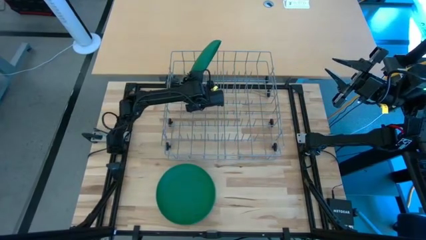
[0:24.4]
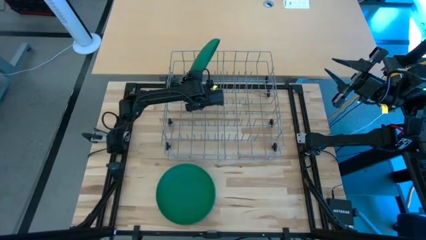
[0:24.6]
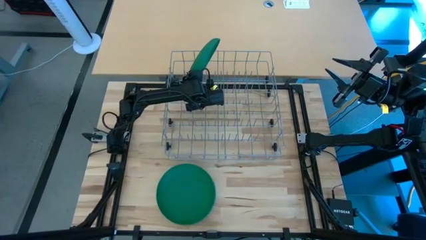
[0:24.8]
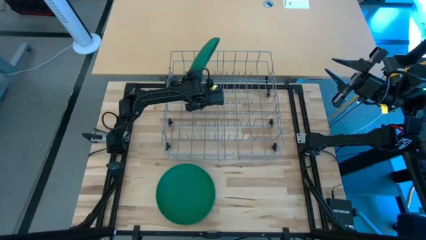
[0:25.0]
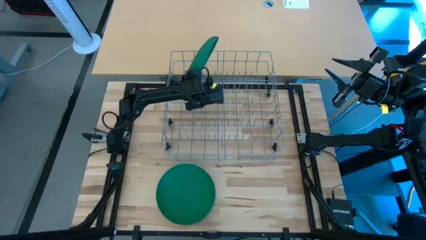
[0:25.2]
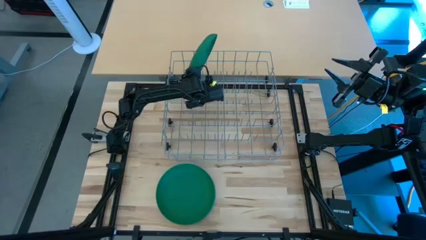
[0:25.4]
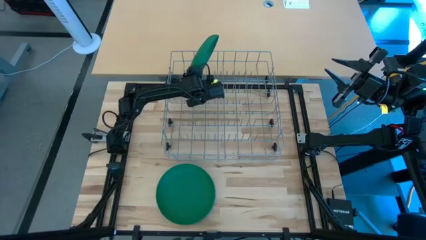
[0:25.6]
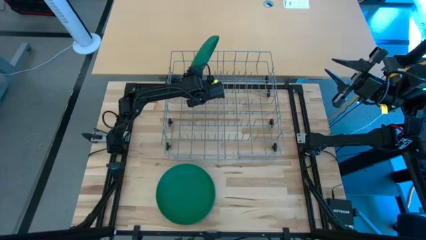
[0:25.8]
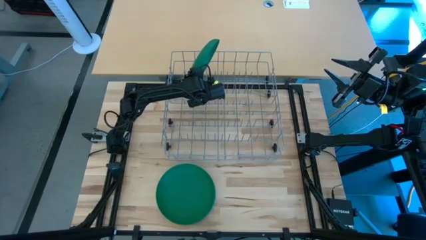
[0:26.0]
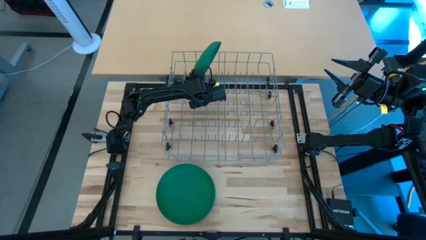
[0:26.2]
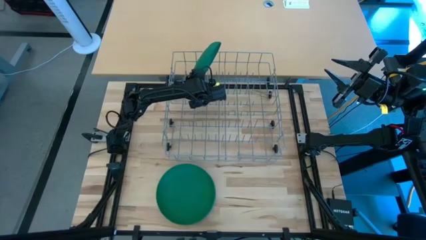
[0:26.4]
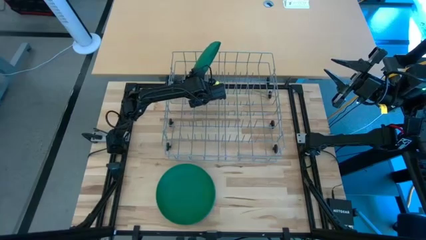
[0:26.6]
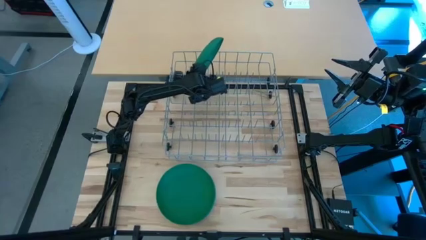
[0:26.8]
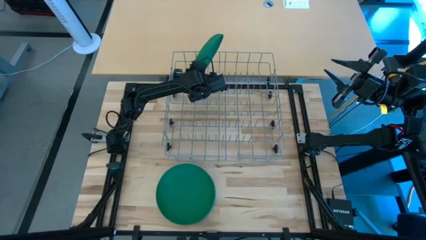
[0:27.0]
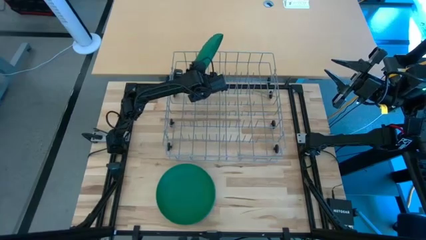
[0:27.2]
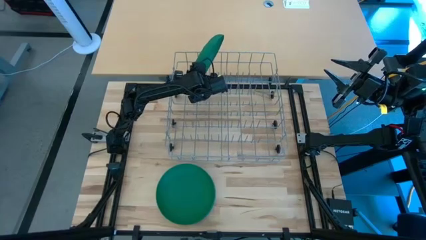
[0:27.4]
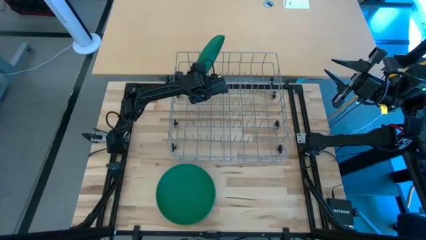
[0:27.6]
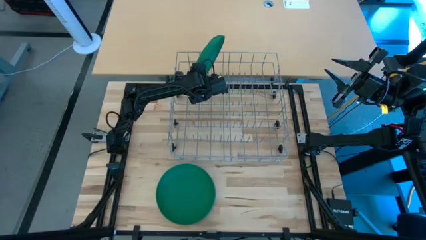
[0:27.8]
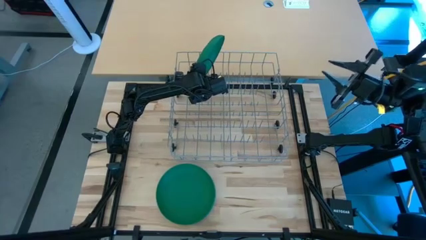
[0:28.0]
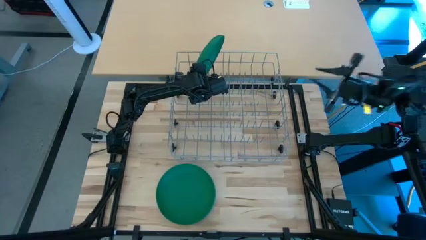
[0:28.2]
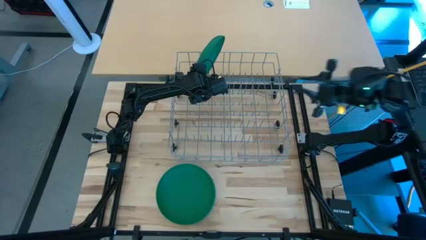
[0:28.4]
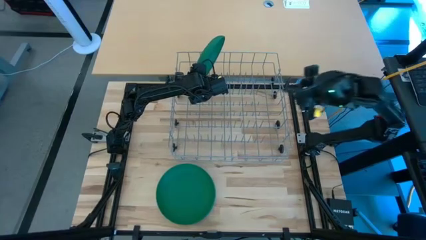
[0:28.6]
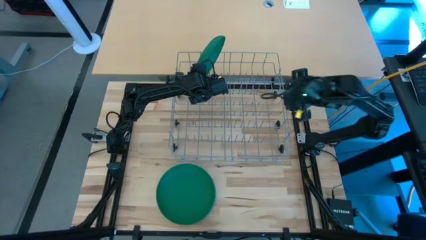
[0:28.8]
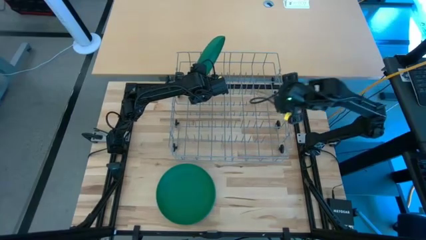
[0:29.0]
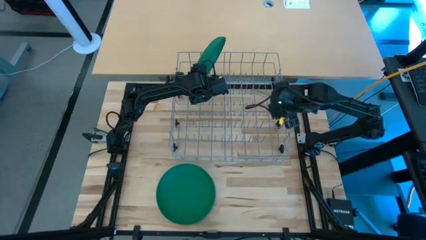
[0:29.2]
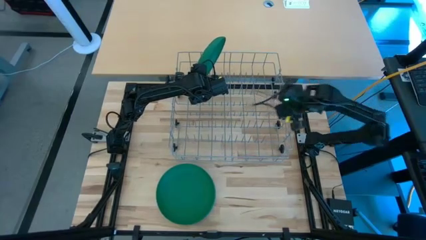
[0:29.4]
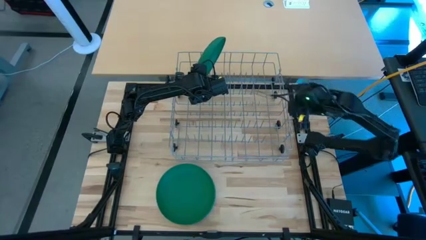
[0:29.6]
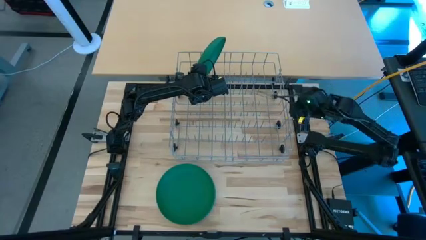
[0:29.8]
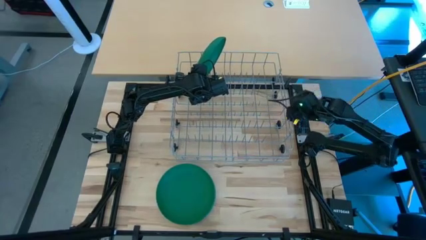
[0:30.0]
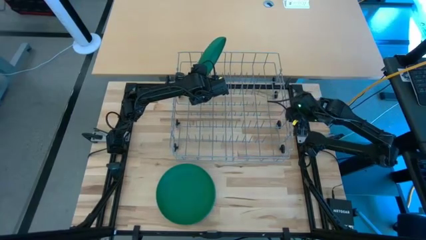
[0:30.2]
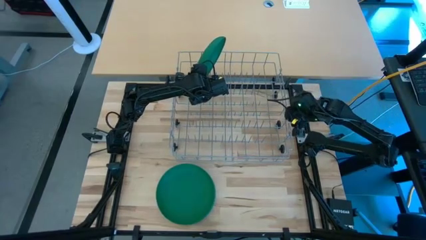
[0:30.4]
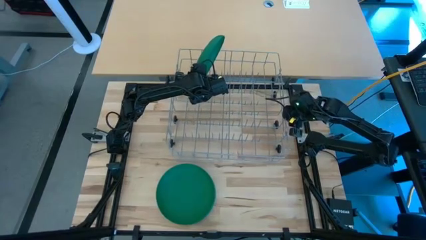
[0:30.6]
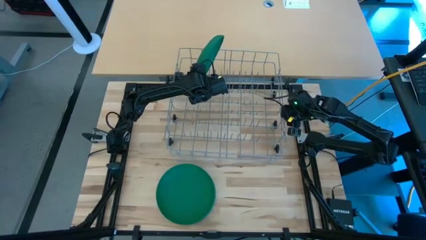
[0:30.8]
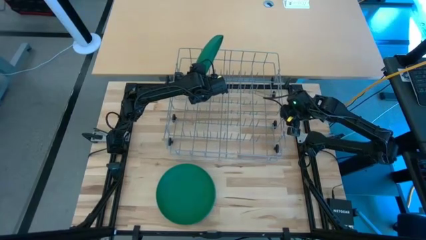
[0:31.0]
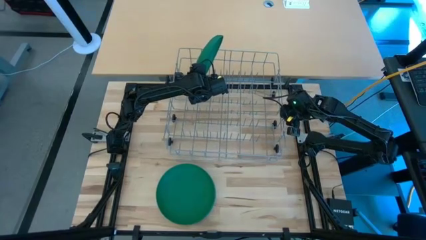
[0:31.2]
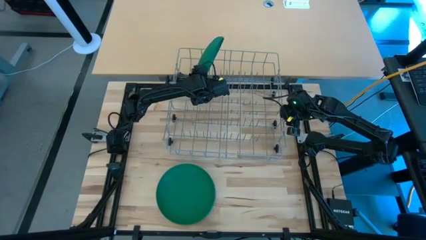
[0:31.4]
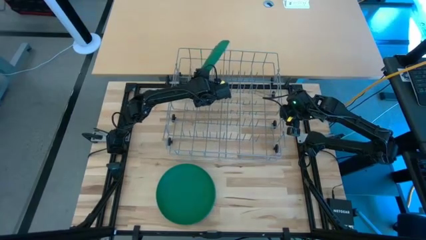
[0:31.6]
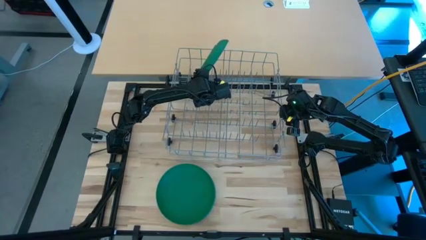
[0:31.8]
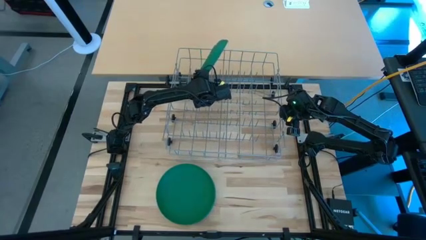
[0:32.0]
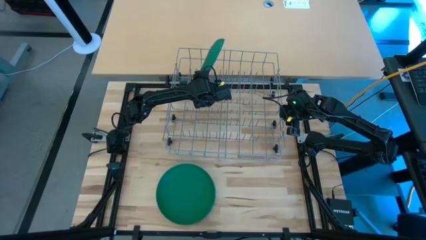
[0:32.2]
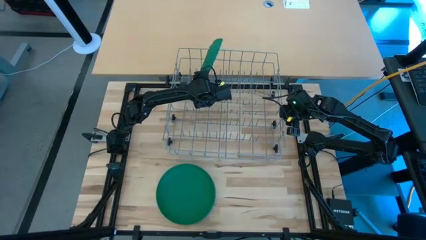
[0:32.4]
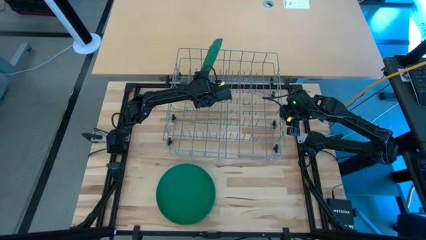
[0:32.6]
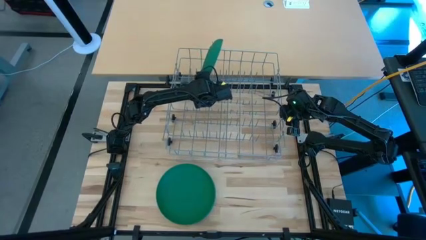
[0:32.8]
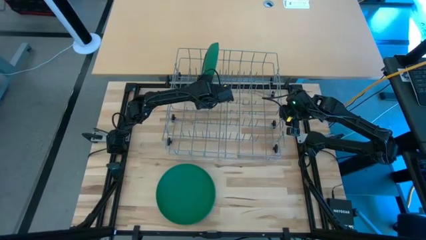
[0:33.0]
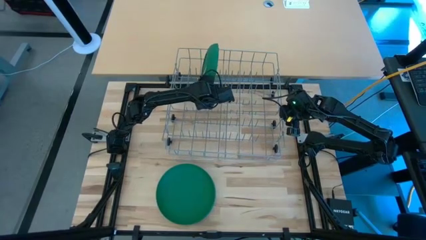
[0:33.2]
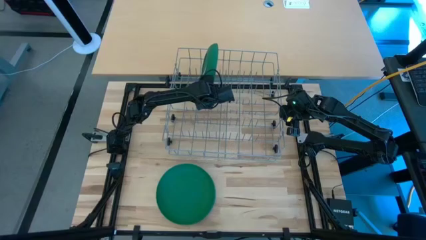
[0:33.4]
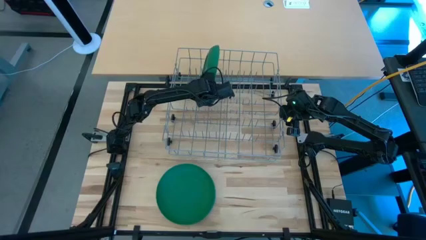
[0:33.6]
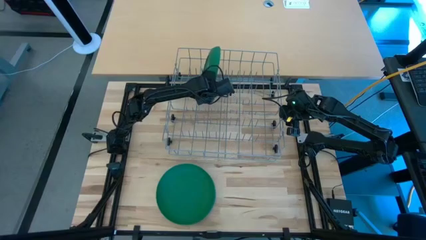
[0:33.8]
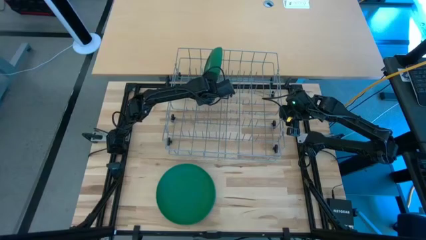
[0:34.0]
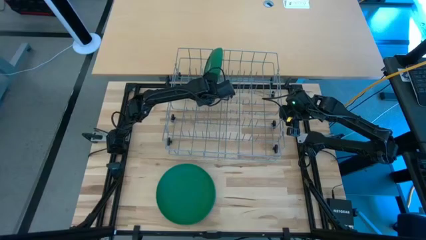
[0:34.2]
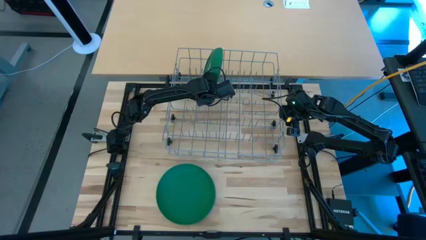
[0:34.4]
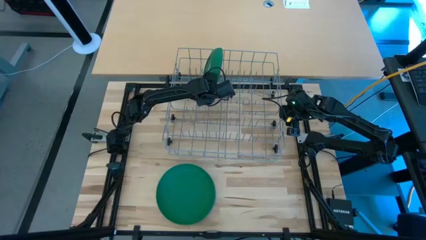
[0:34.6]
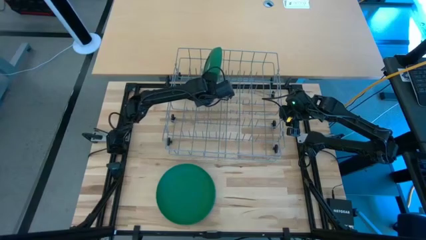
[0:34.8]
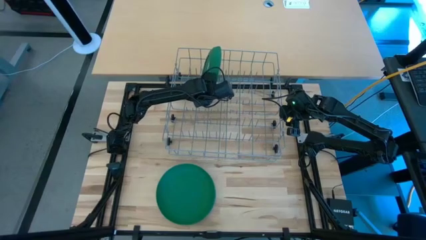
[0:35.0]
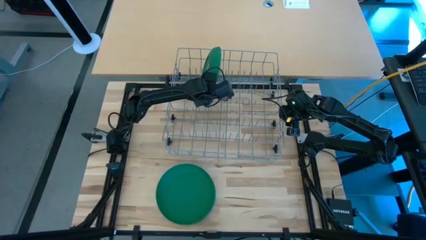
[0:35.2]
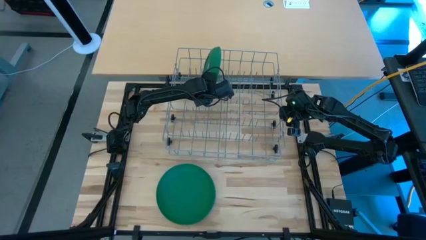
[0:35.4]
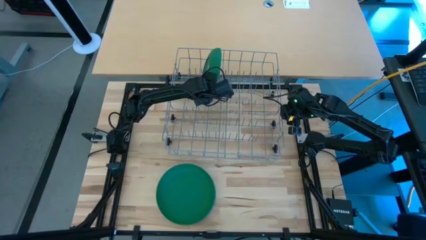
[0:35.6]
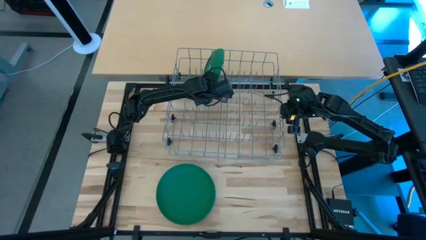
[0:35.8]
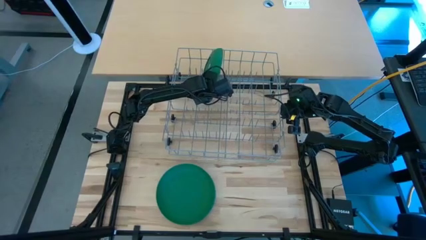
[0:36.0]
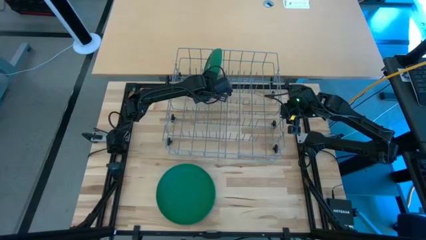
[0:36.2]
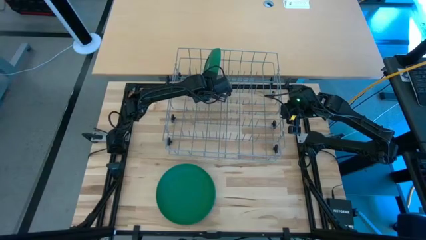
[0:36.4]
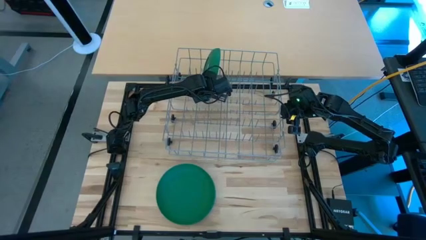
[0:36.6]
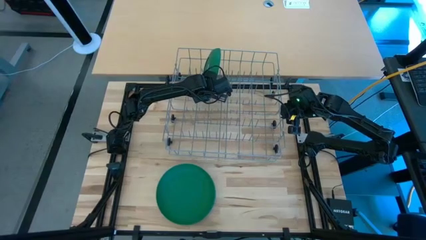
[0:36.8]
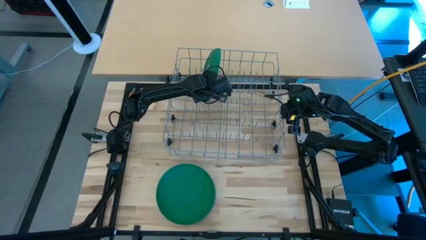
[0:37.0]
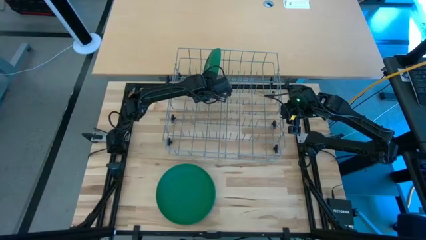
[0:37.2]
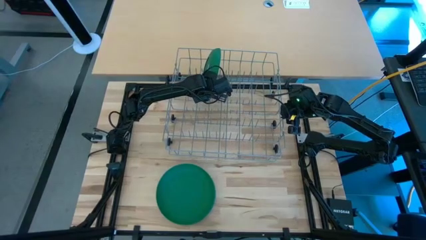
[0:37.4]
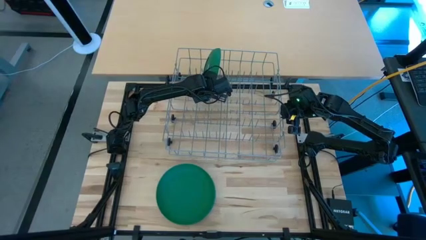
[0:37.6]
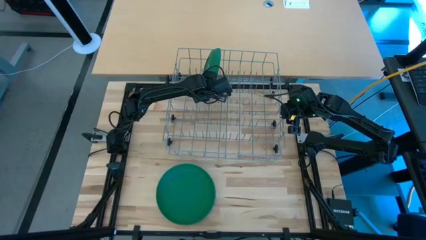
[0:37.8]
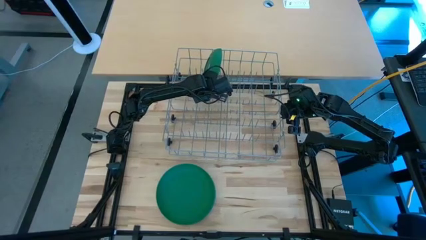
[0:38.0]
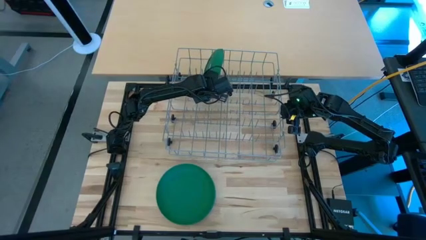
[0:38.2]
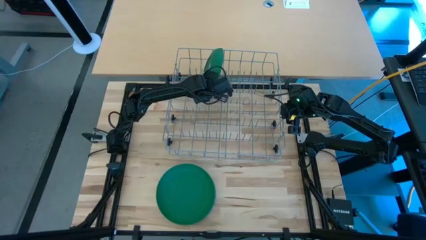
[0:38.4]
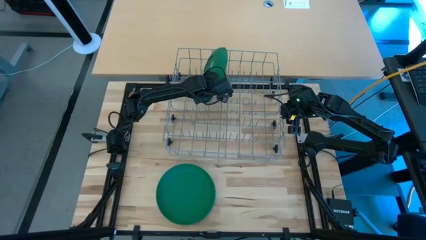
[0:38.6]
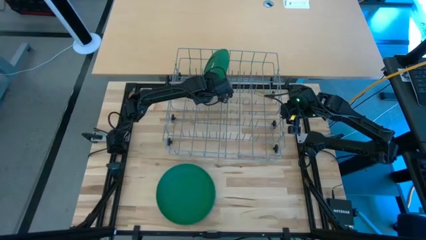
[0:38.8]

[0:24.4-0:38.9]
Task: Sort dishes
Put the top green plate into the dish rack
